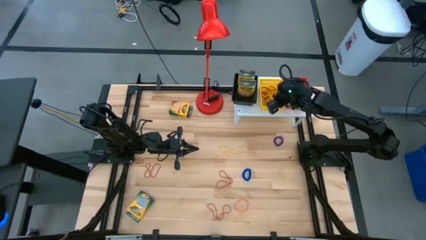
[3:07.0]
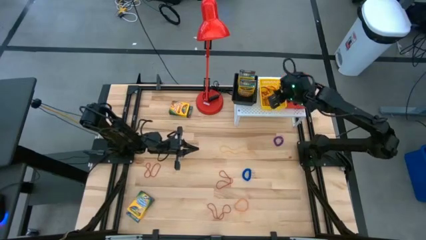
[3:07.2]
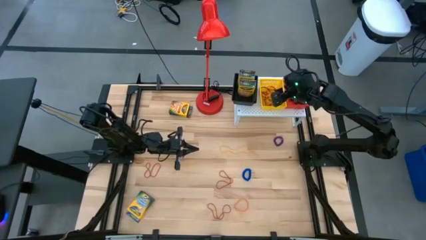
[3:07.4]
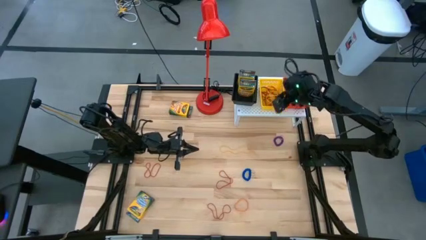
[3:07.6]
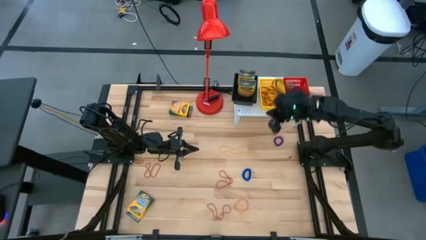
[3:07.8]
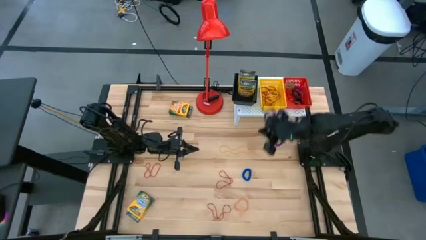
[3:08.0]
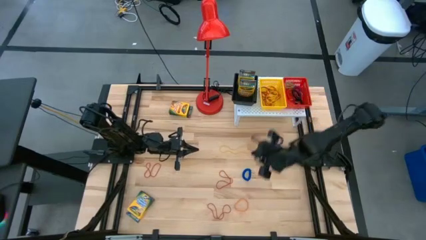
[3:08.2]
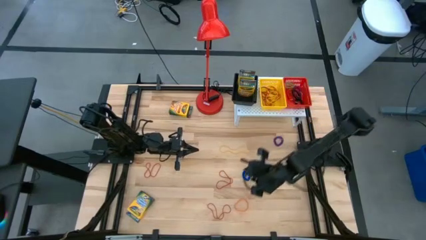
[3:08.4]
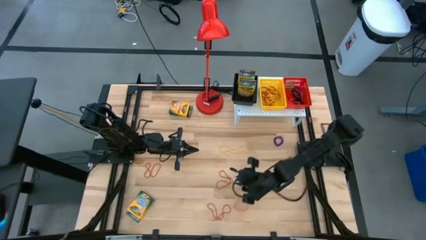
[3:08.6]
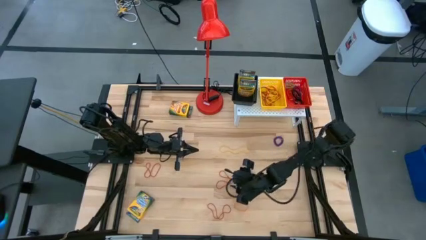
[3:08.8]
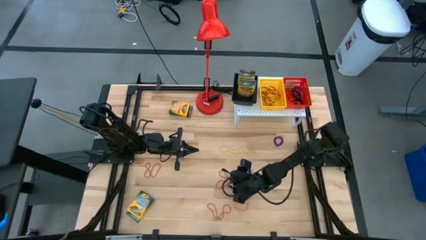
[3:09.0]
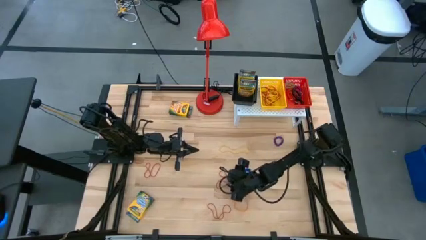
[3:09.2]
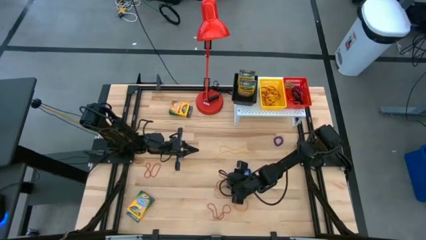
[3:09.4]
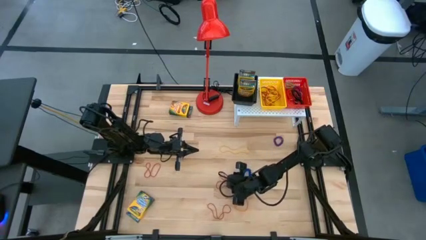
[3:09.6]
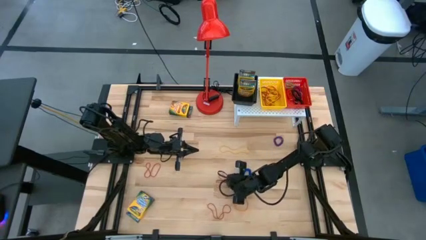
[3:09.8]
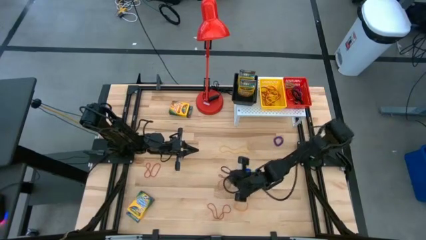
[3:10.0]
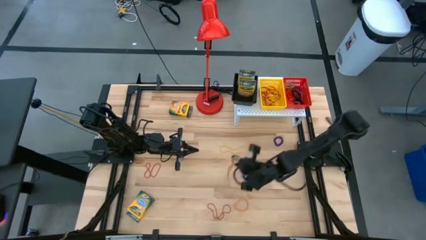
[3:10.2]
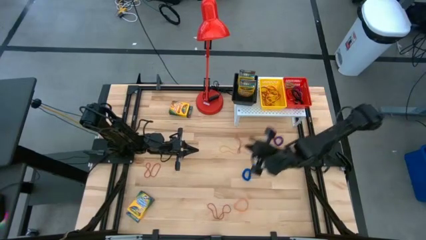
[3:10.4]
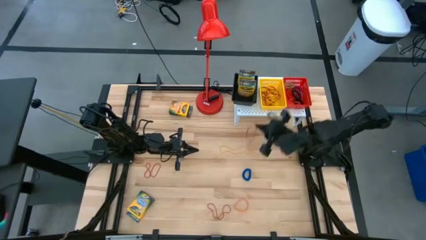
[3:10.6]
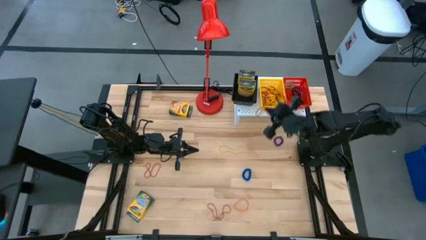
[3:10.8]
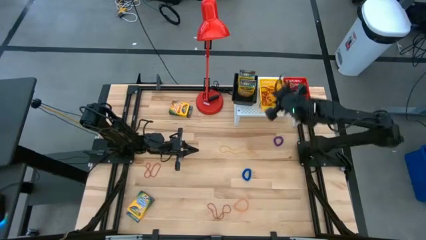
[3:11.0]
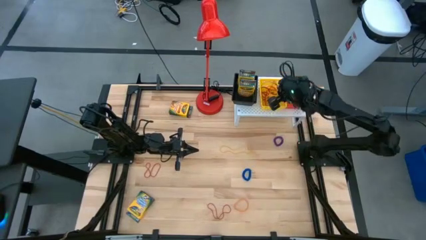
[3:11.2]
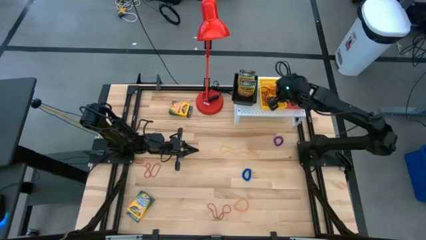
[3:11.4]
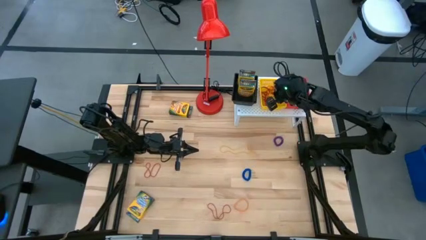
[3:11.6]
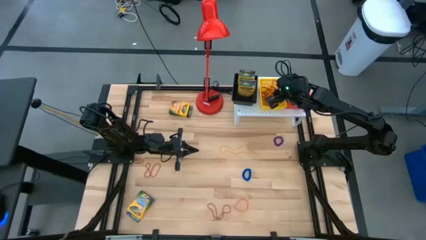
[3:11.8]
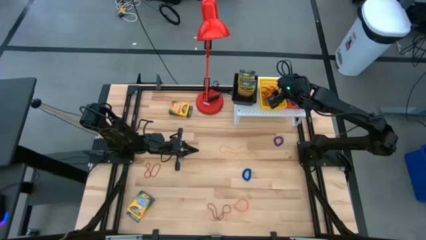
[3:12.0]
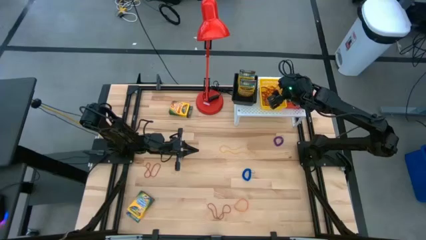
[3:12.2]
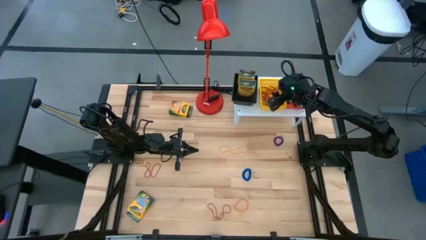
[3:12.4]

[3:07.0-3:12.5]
Task: Pick & Place Office Desk Supplies
Put the top right red rubber band into the yellow bin

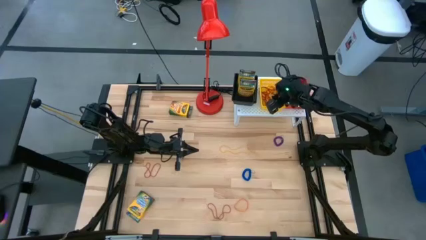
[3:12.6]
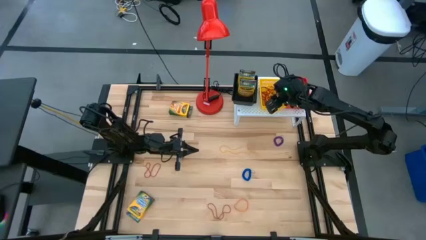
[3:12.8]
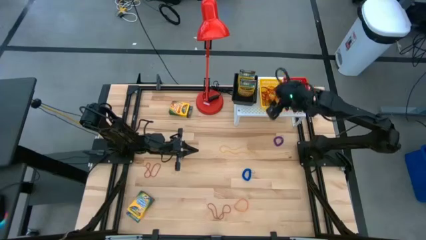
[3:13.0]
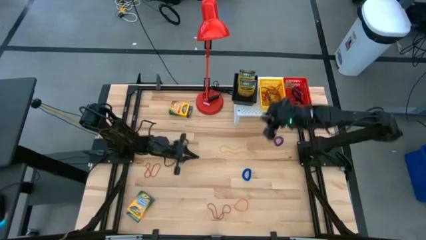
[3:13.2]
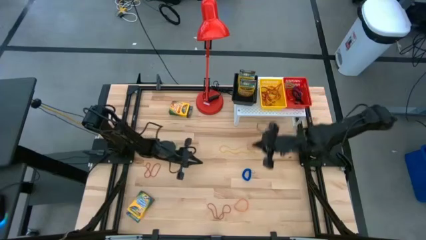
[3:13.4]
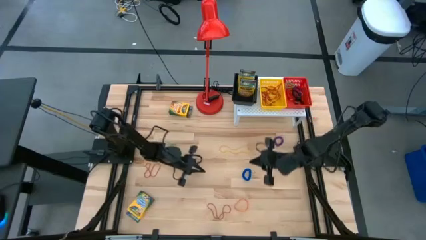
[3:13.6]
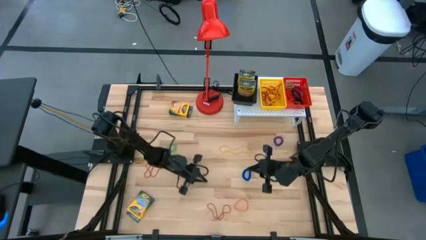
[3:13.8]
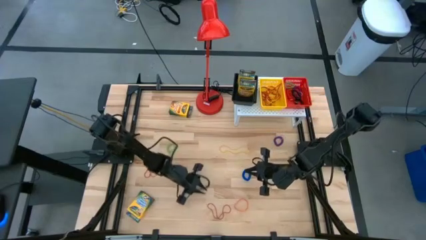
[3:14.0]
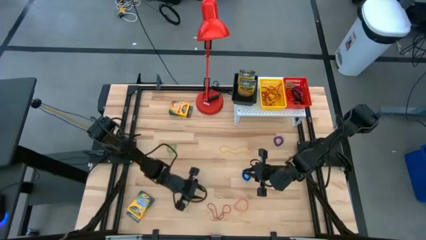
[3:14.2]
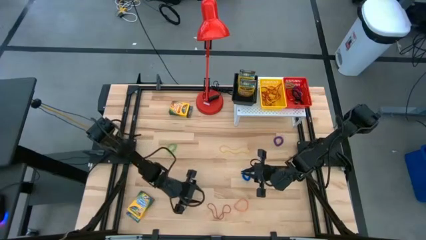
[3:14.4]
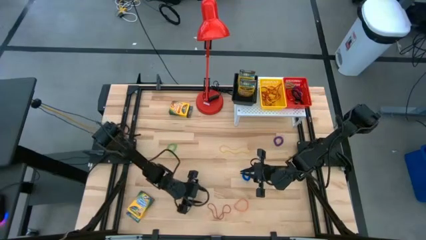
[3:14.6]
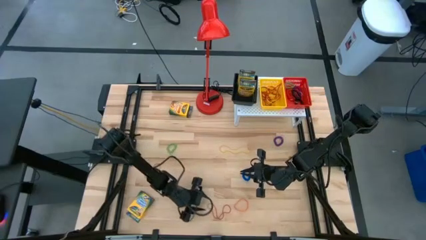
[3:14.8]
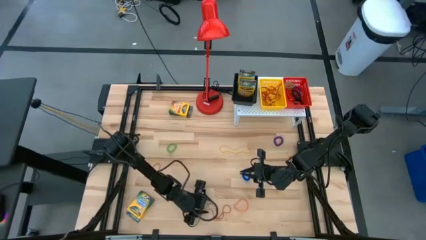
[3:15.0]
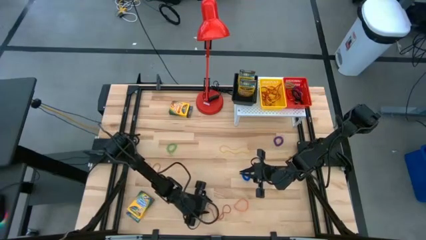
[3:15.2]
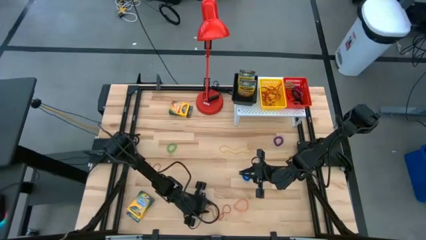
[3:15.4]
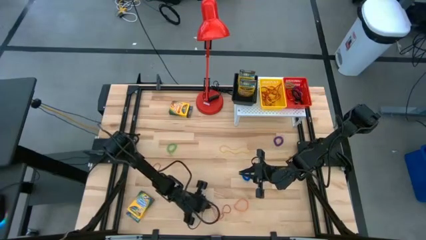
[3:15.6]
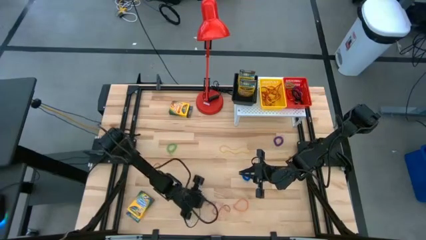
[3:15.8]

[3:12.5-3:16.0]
Put the right red rubber band into the yellow bin

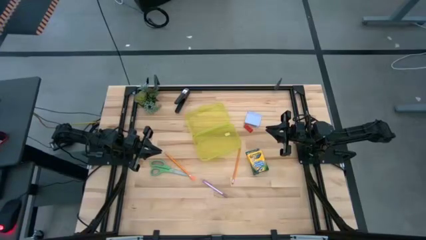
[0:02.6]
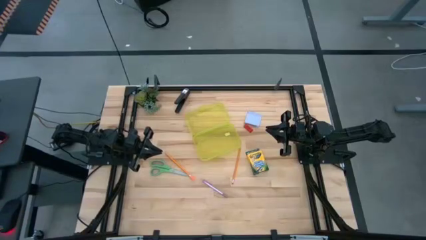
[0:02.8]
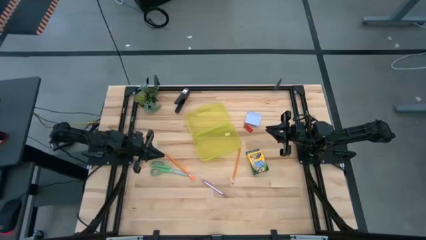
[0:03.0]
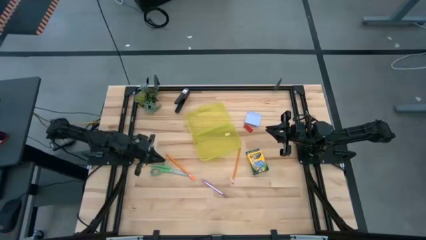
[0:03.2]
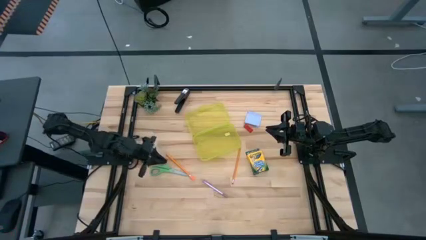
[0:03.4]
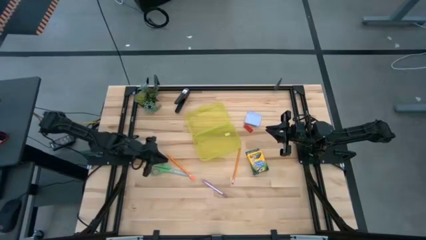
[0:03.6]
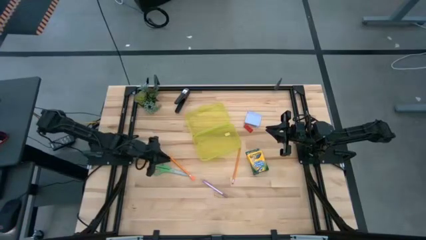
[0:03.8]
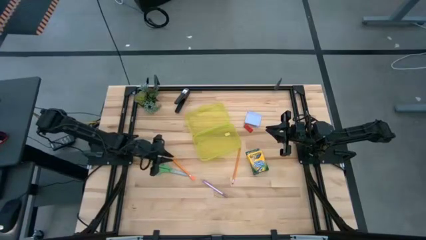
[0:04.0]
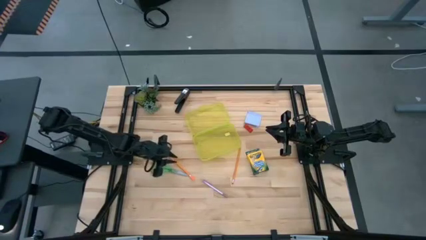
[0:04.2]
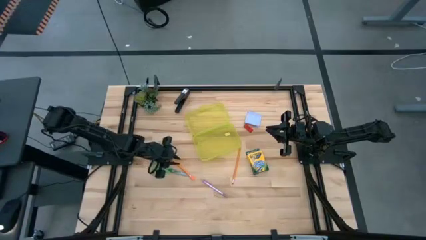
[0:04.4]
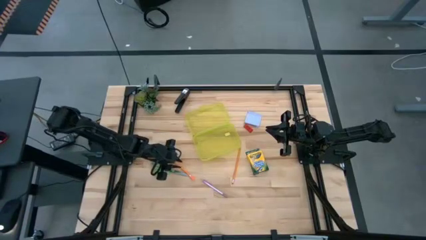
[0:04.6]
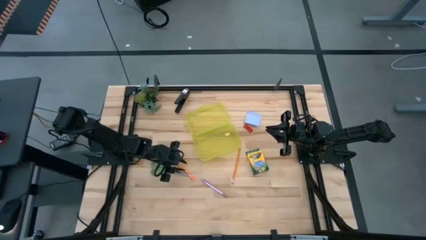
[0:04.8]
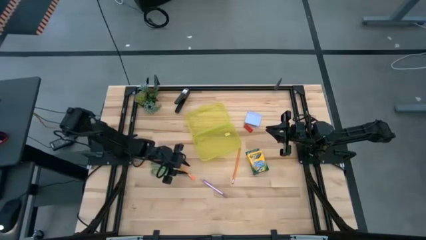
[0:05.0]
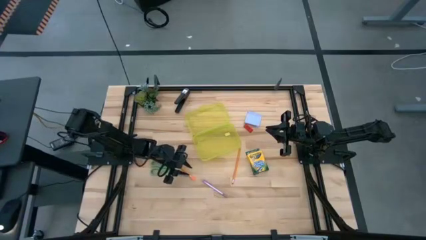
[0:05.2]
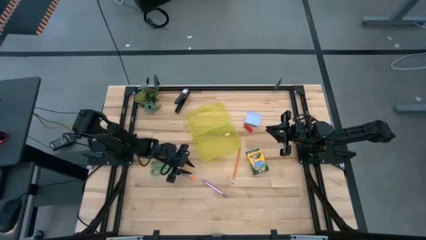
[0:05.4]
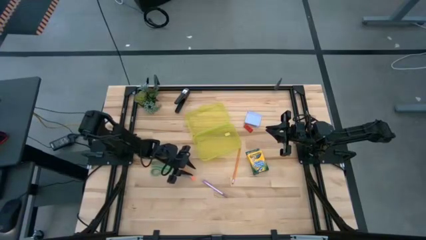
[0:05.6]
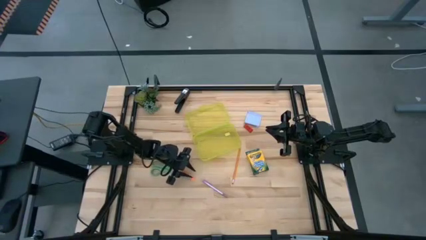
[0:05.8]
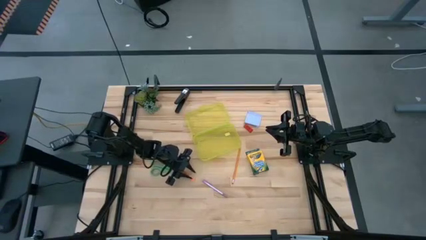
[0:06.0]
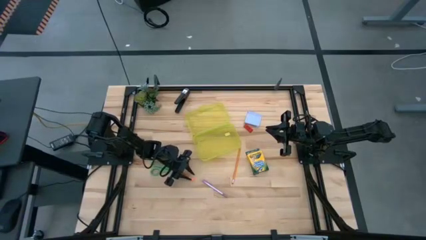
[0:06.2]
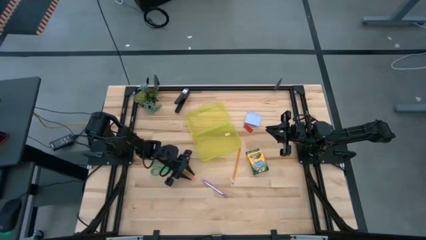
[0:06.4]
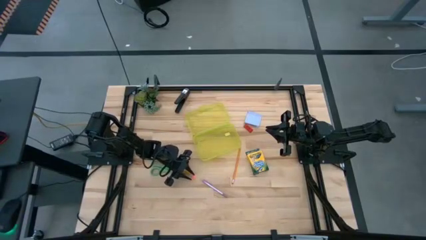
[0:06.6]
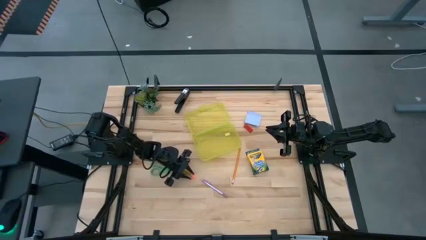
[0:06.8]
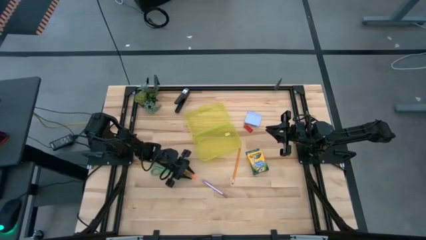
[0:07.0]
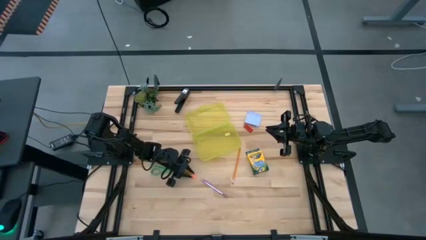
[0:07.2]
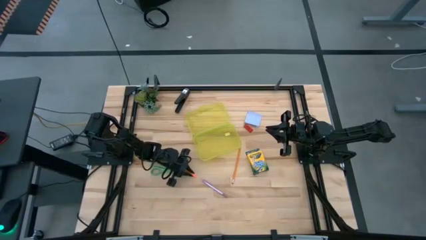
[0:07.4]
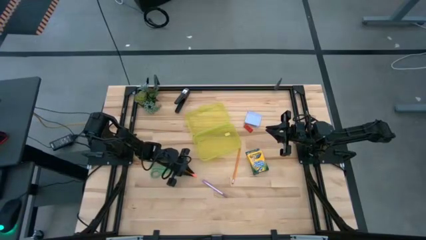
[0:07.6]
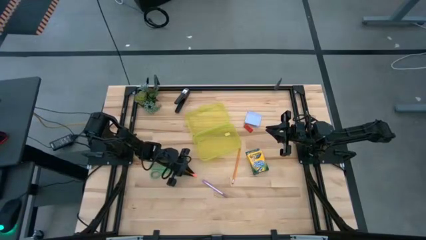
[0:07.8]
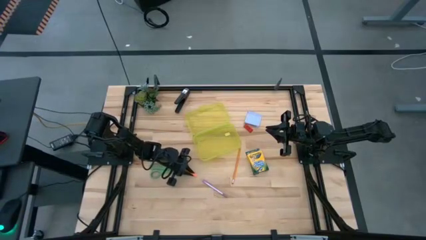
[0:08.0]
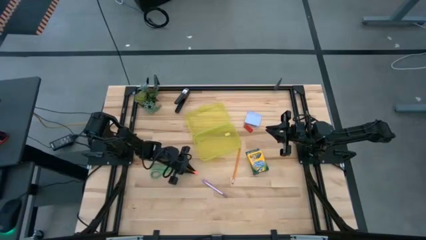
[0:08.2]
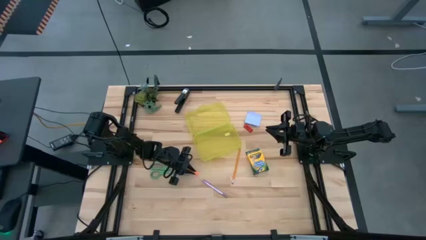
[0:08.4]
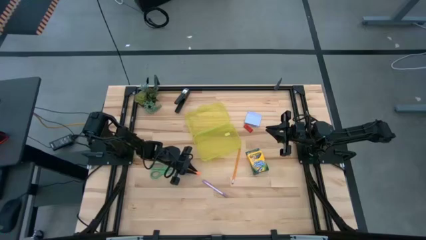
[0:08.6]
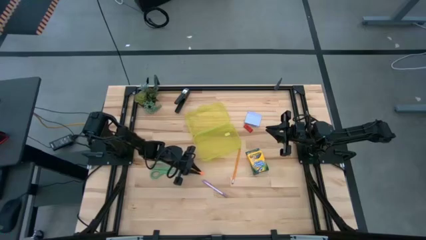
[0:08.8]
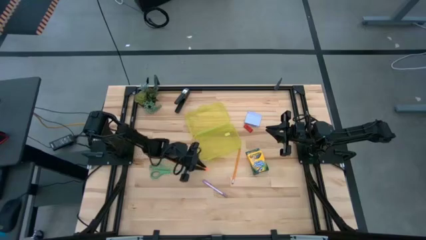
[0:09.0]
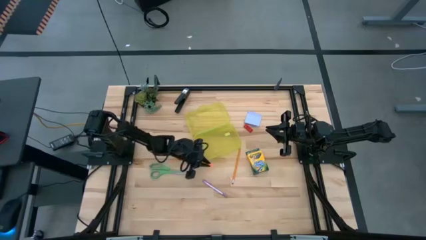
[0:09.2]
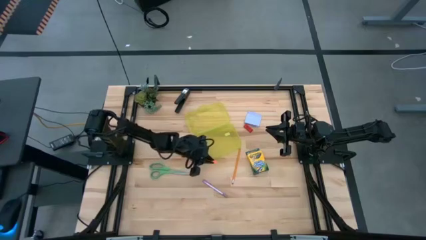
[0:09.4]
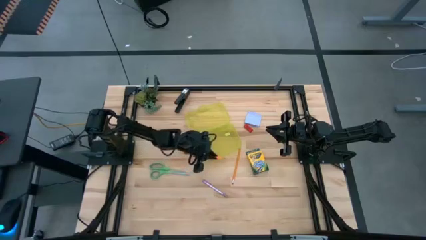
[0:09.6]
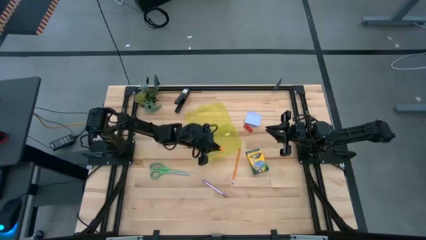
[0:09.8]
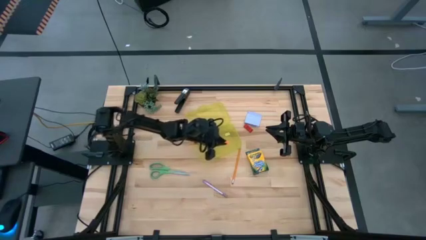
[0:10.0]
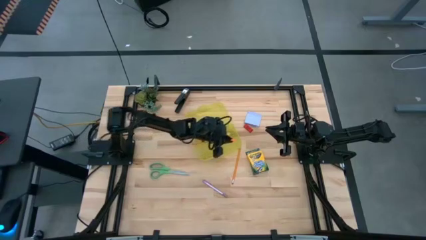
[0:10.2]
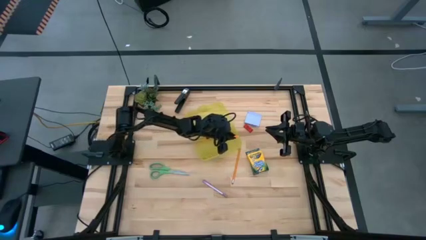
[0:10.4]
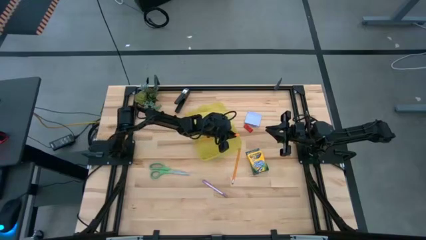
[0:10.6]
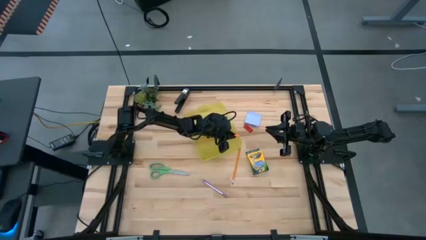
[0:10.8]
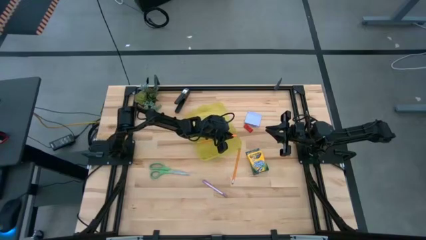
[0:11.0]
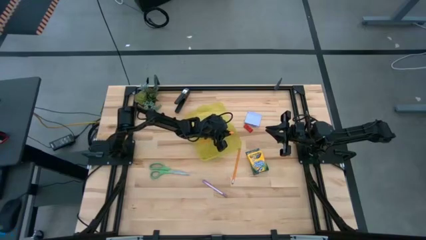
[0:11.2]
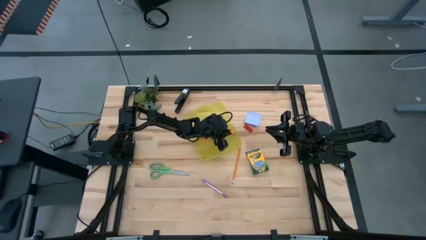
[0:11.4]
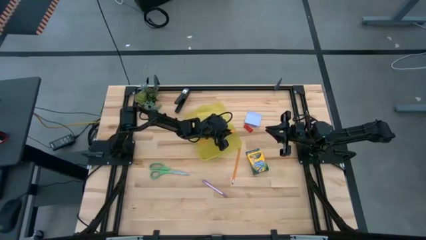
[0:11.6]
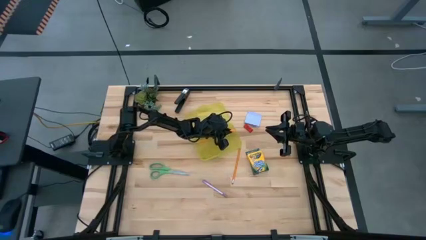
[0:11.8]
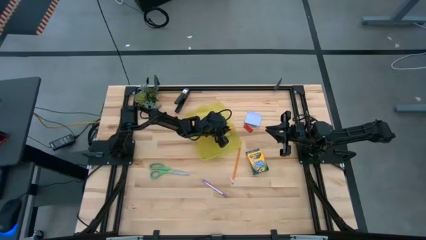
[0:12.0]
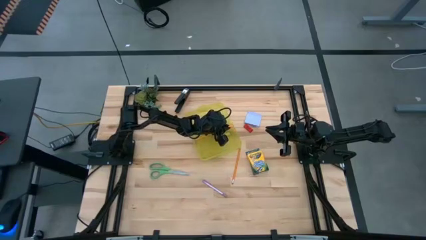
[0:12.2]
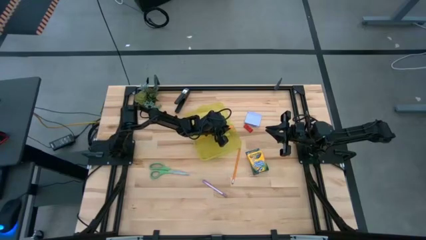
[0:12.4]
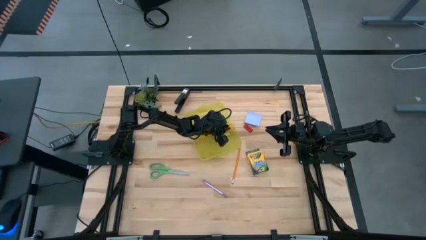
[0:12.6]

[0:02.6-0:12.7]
Task: Pack school essentials
Put the yellow pencil into the yellow supply box
